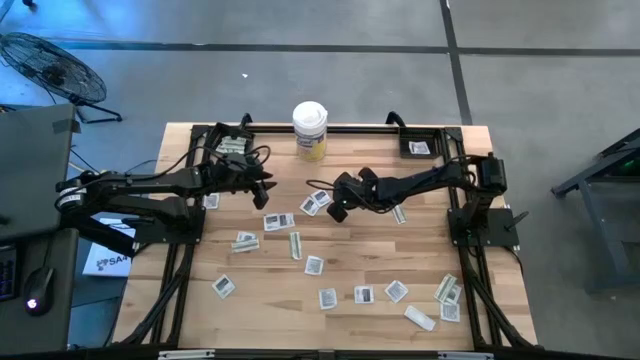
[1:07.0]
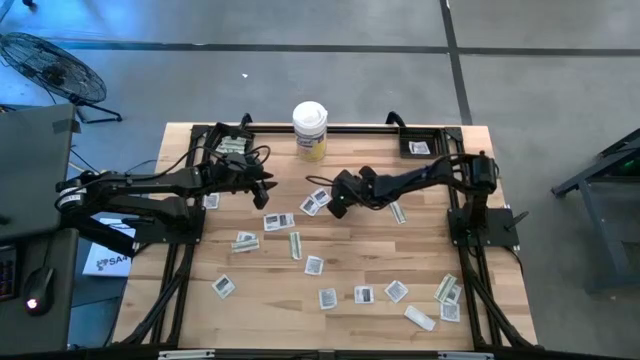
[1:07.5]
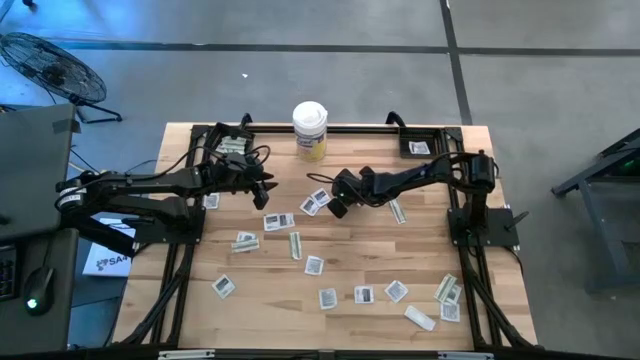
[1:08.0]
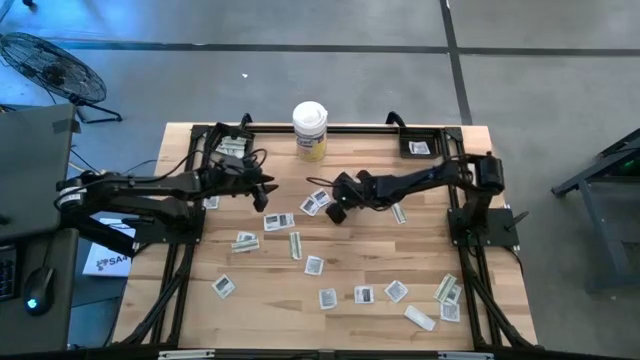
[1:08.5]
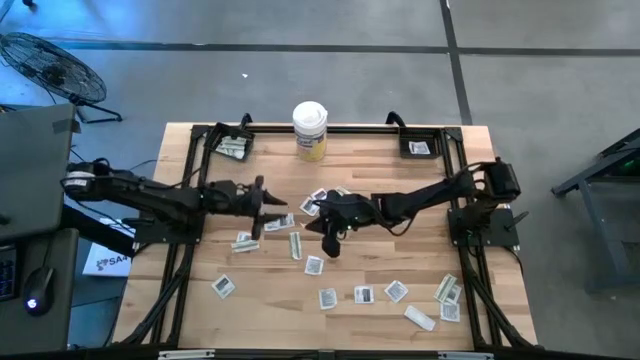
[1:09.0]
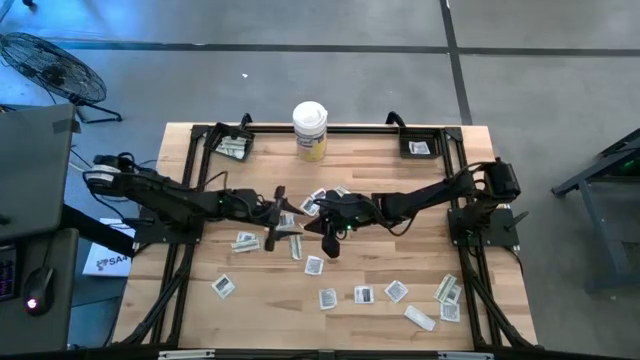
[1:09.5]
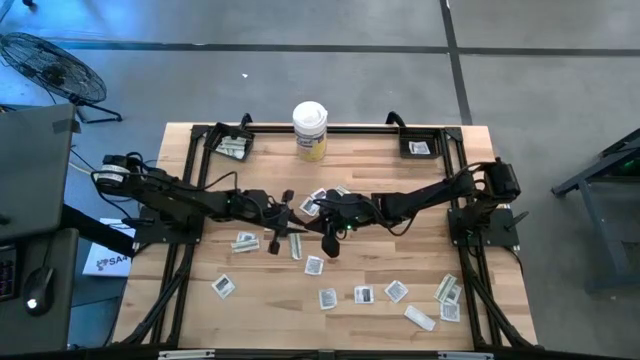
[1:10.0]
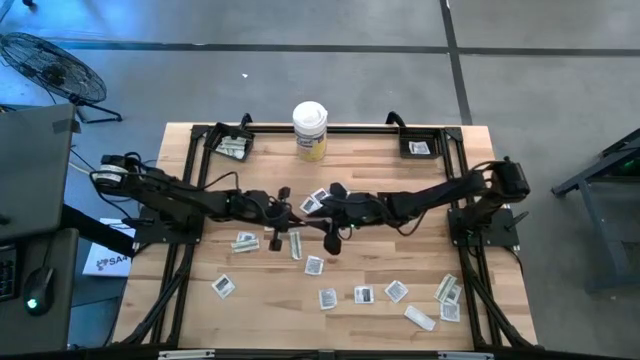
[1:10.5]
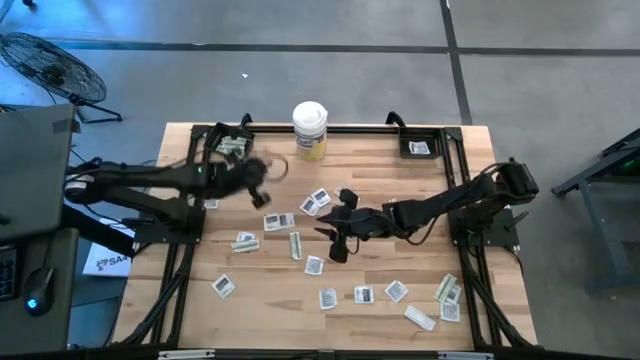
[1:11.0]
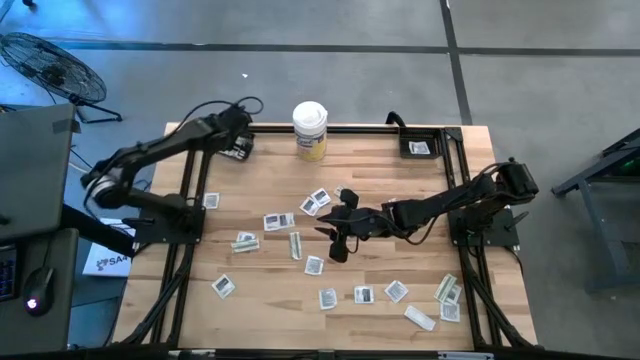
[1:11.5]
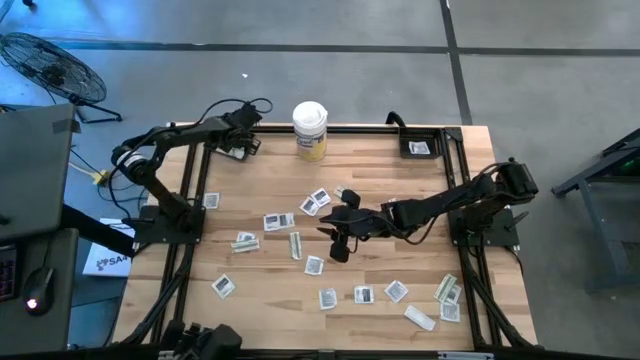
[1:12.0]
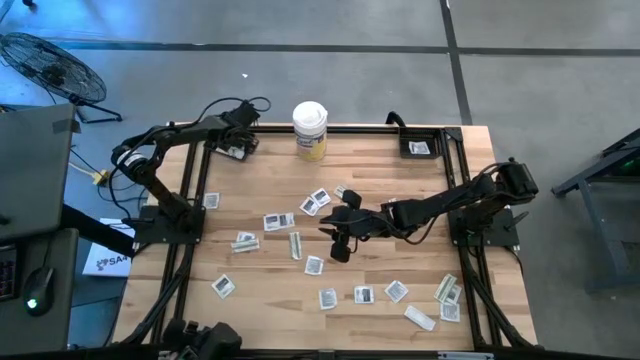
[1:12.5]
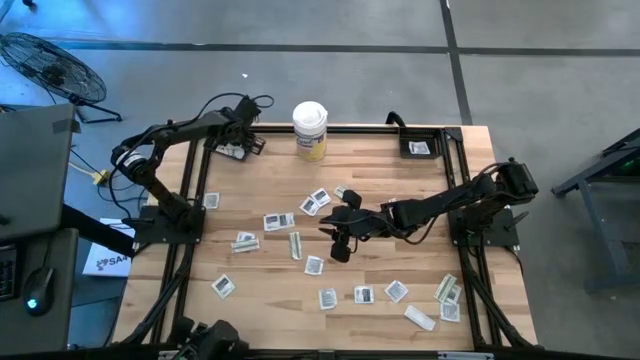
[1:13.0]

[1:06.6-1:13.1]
Task: Pick & Place First Aid Supplies
Put the green bandage pack into the left black basket

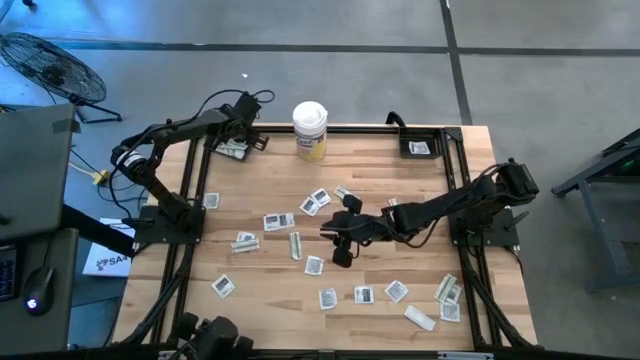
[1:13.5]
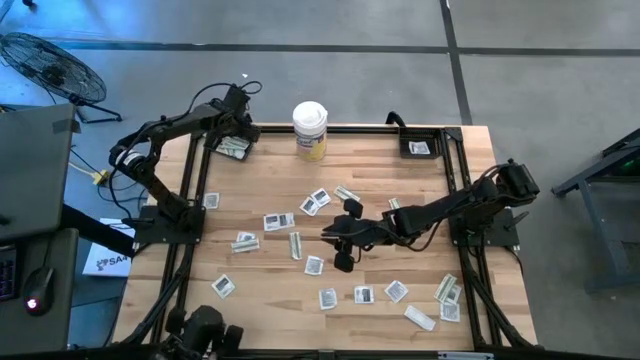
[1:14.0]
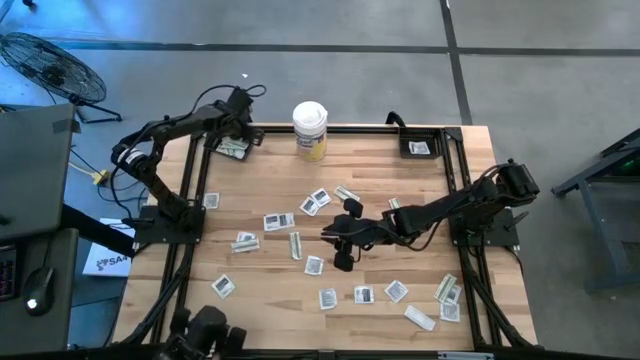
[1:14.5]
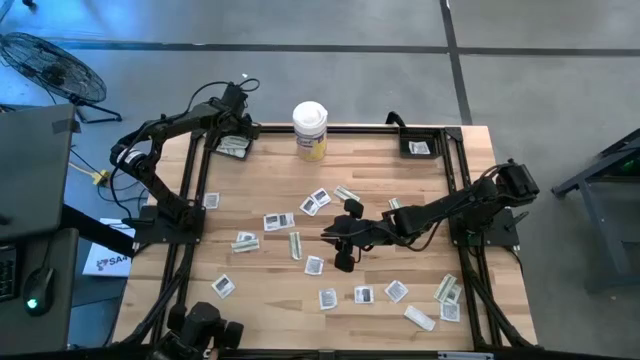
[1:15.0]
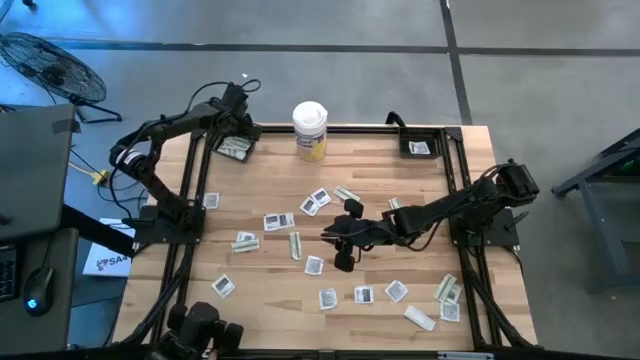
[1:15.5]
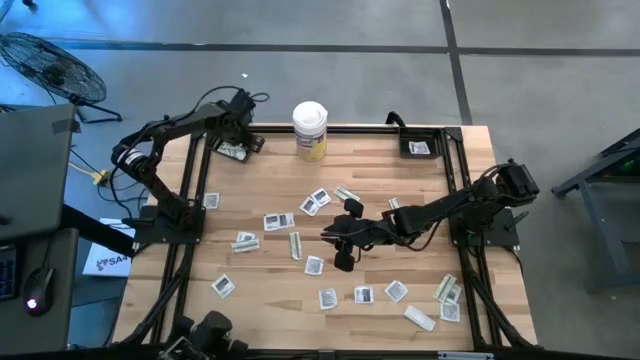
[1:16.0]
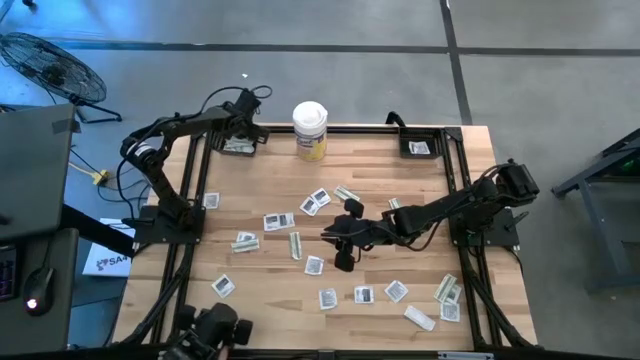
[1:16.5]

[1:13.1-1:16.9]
Adjust the left black basket

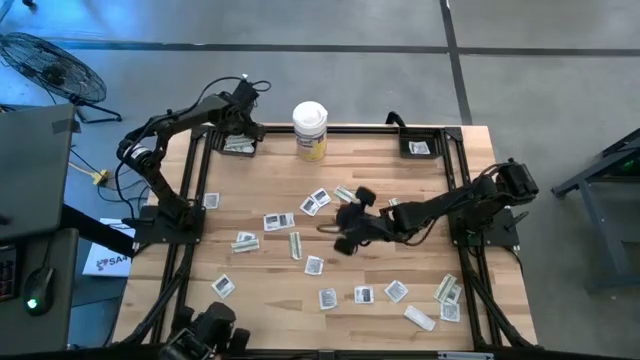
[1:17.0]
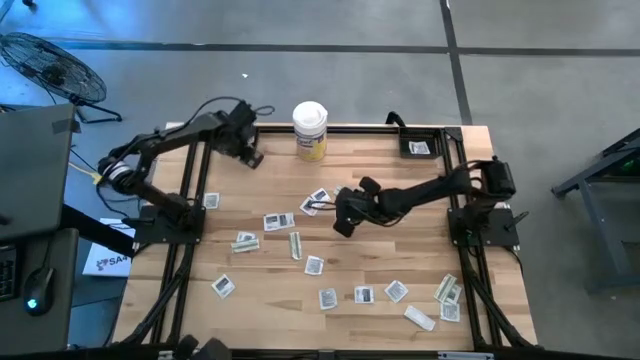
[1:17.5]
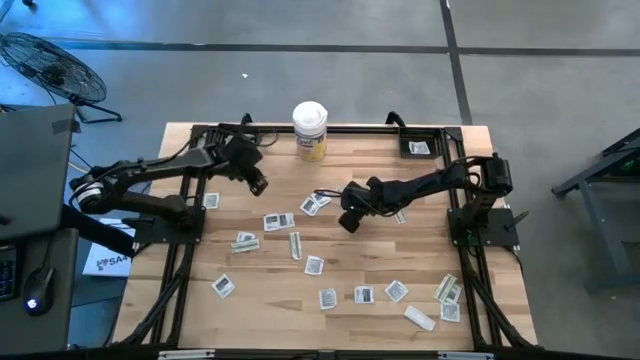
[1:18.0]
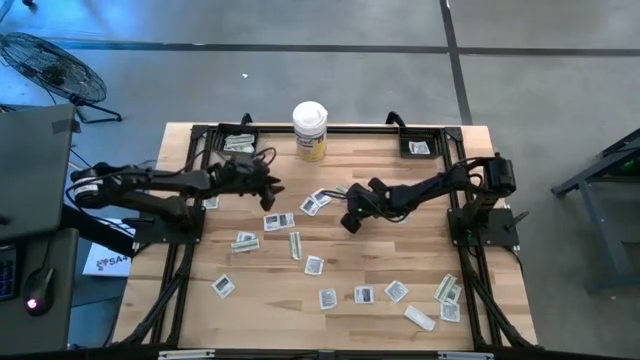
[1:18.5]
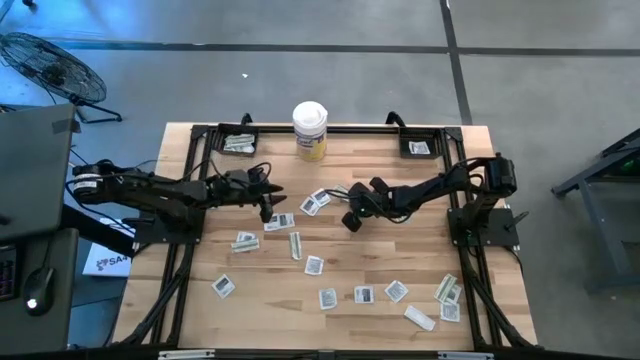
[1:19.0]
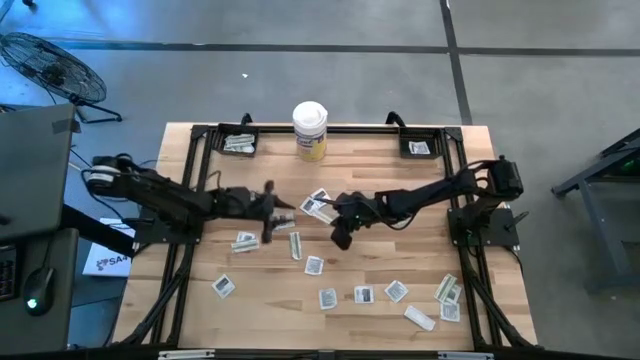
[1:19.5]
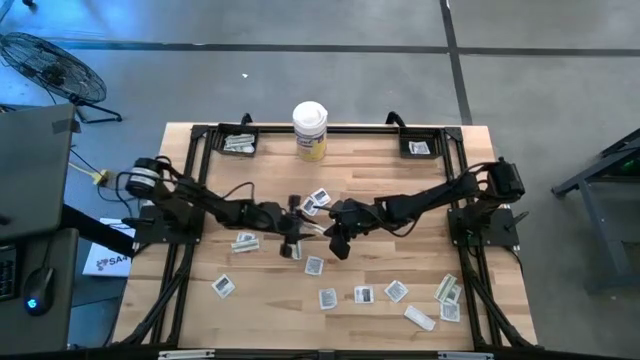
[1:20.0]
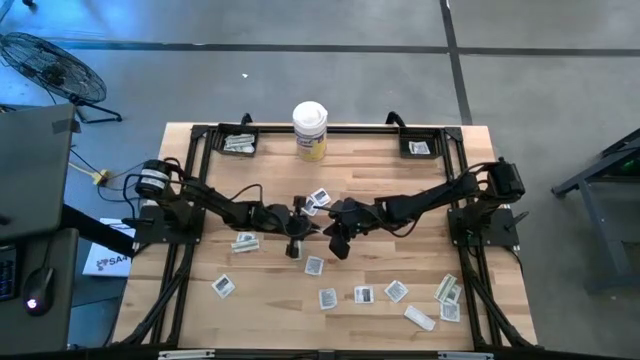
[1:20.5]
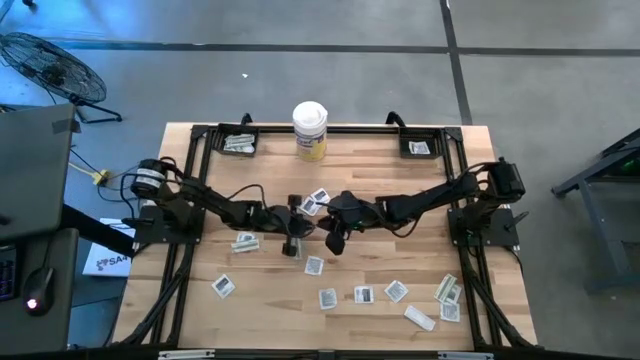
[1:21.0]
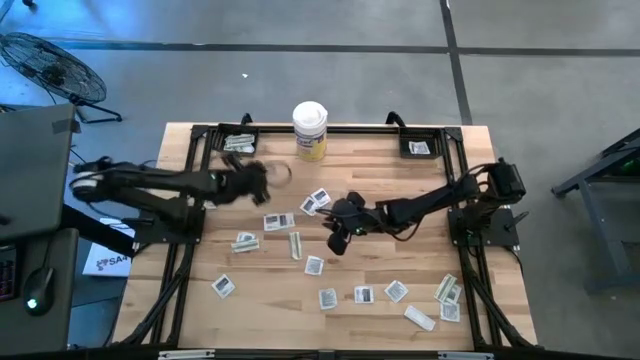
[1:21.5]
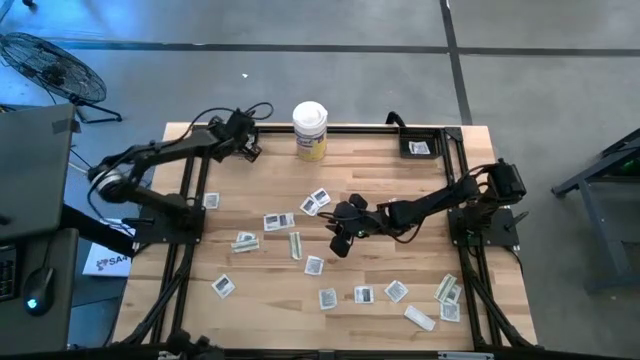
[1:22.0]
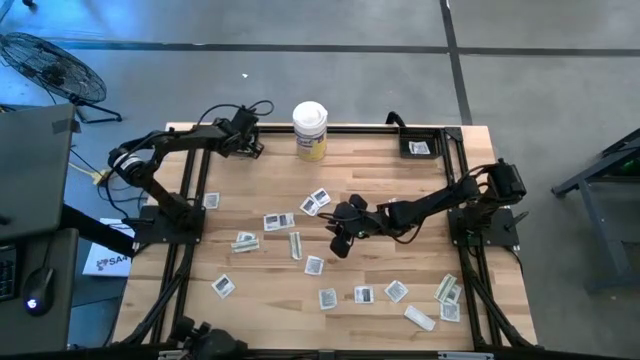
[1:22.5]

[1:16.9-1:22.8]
Put the green bandage pack into the left black basket

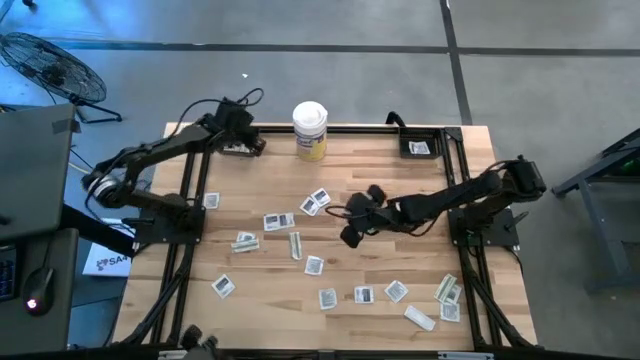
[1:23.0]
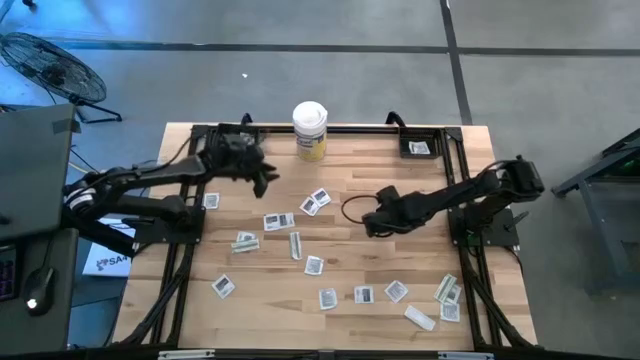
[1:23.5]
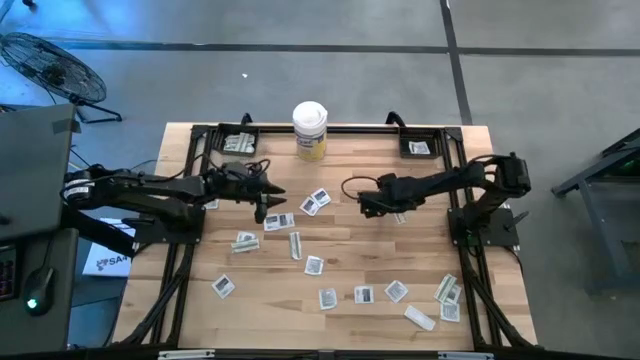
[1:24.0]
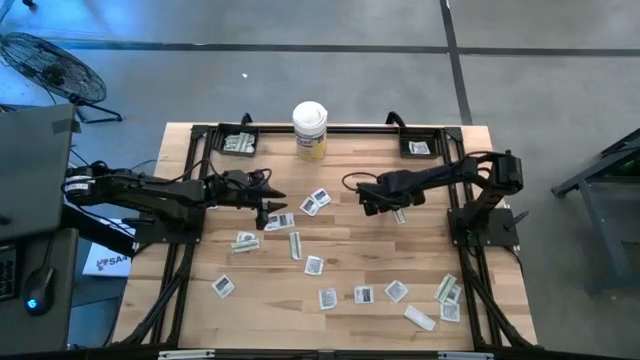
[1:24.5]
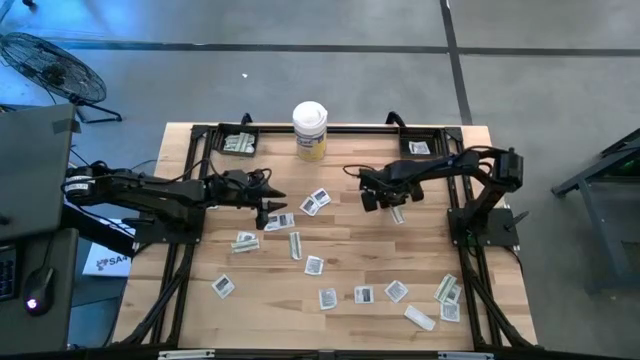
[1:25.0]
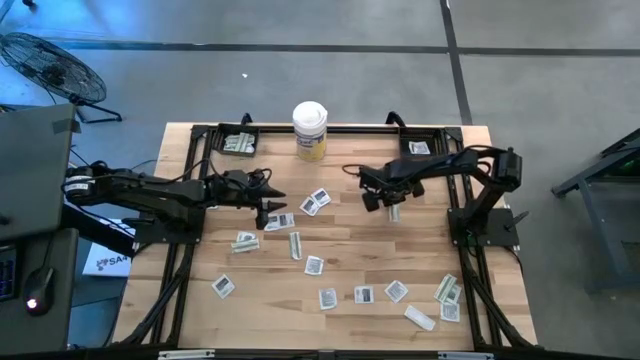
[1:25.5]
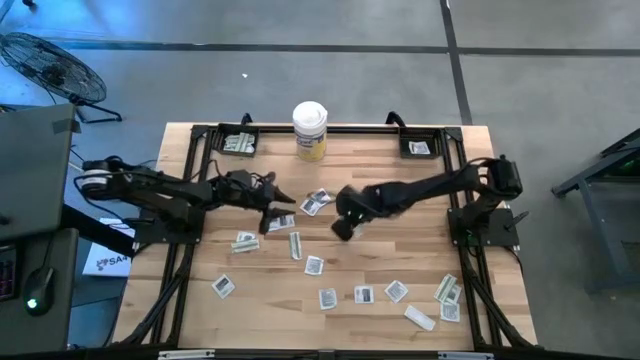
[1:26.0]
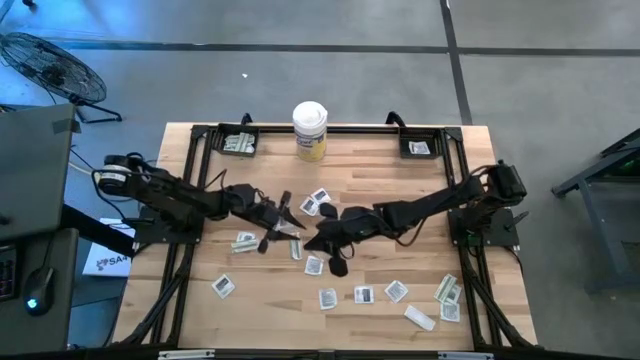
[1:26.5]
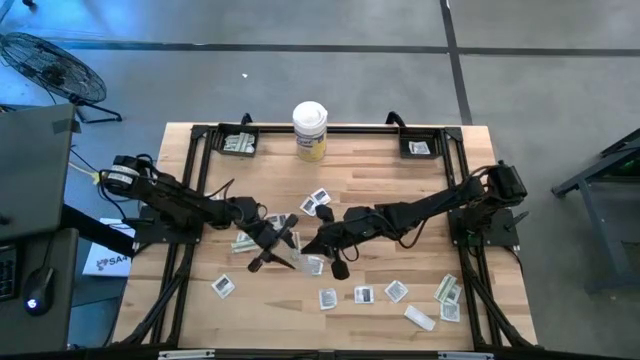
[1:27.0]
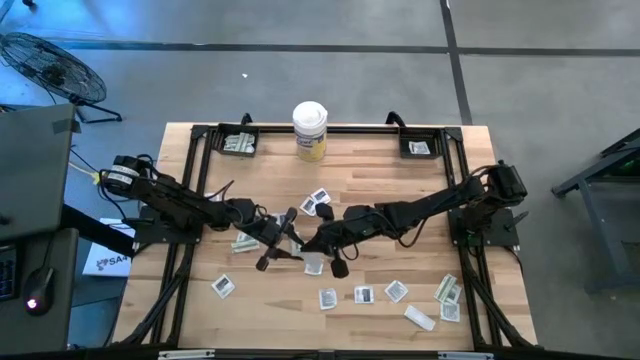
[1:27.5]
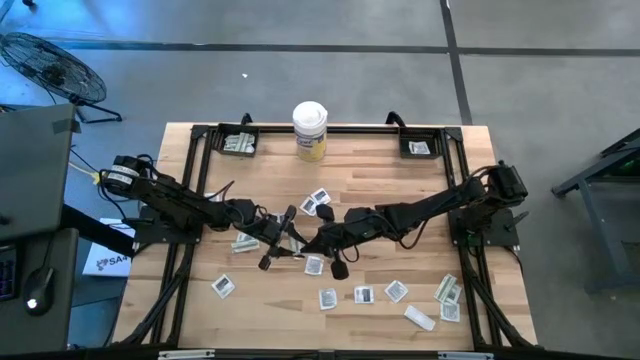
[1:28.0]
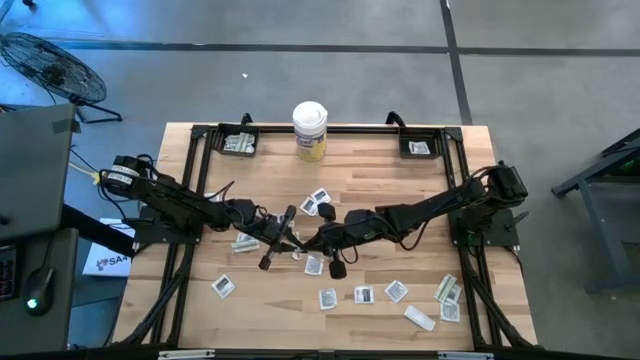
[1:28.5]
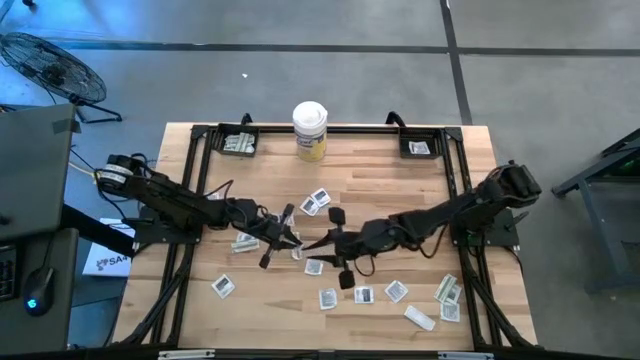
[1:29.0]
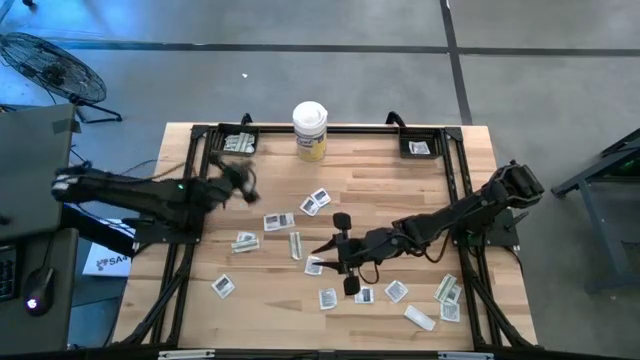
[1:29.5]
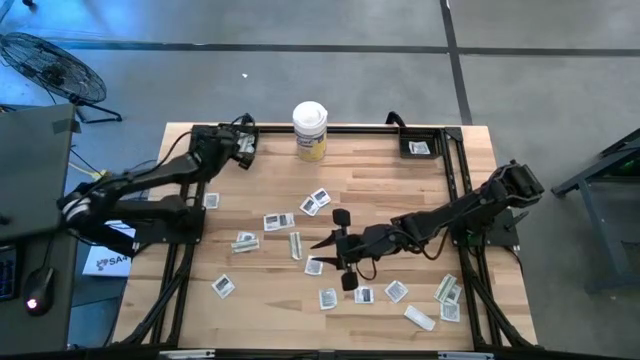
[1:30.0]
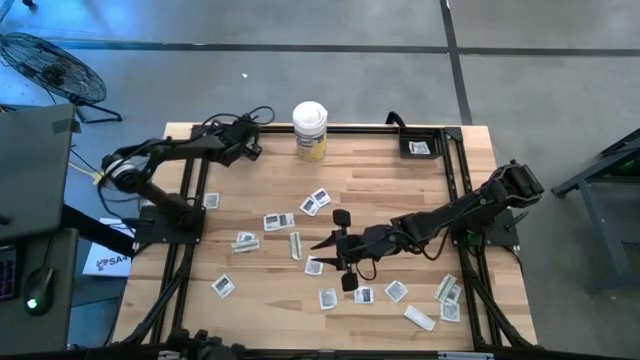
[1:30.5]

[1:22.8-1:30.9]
Put the green bandage pack into the left black basket
